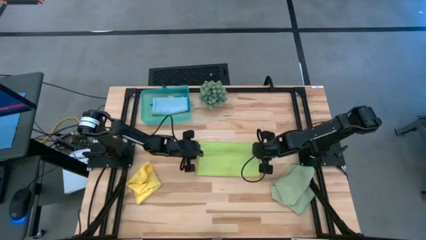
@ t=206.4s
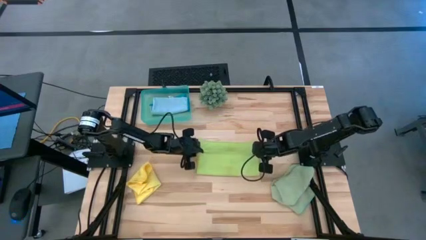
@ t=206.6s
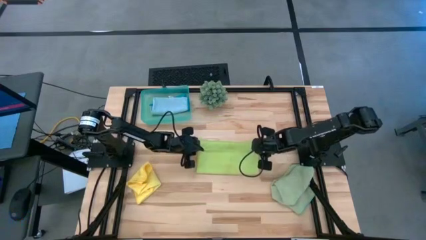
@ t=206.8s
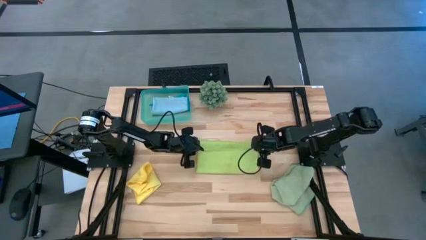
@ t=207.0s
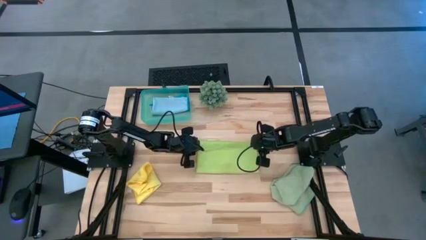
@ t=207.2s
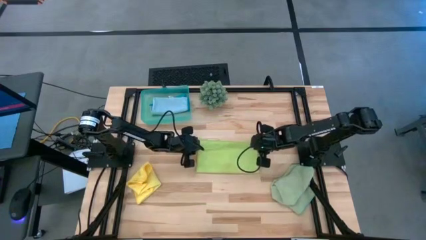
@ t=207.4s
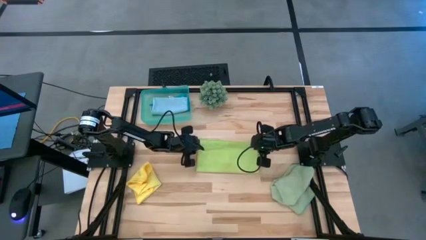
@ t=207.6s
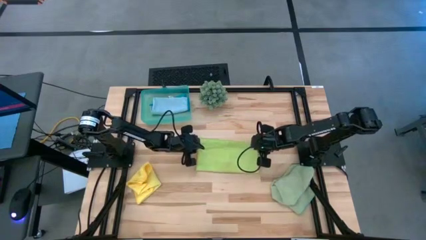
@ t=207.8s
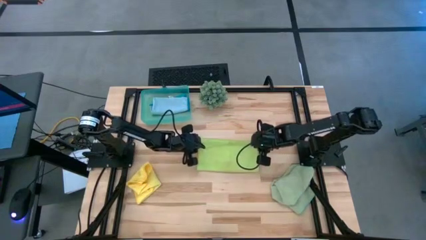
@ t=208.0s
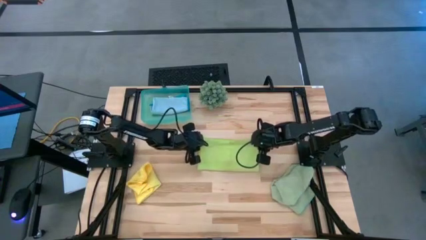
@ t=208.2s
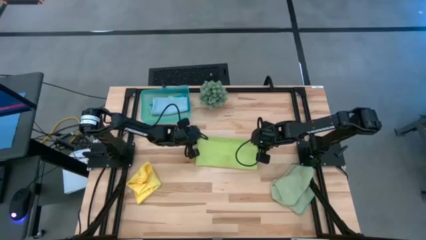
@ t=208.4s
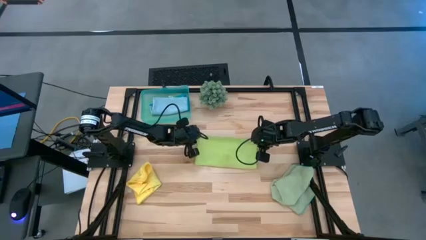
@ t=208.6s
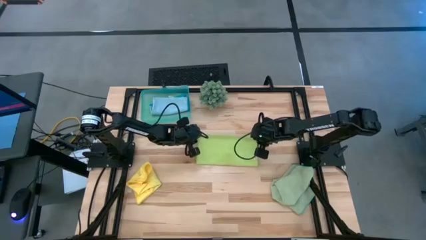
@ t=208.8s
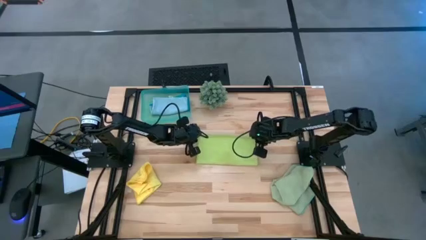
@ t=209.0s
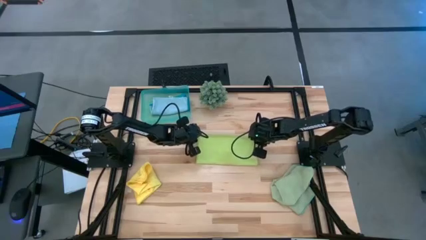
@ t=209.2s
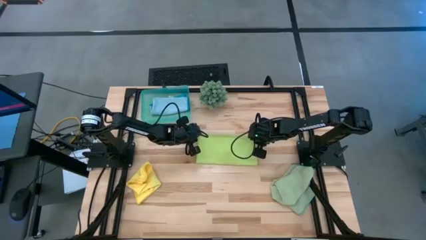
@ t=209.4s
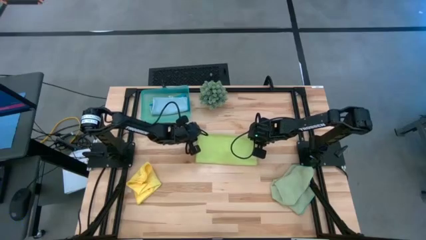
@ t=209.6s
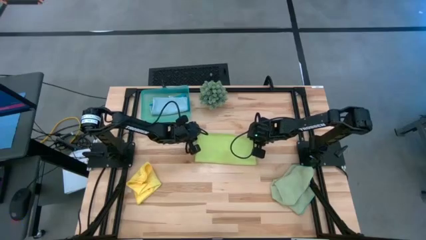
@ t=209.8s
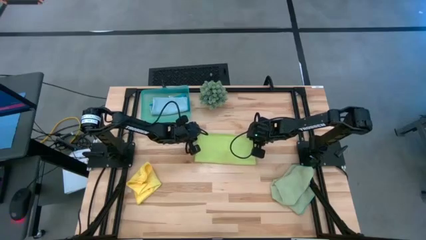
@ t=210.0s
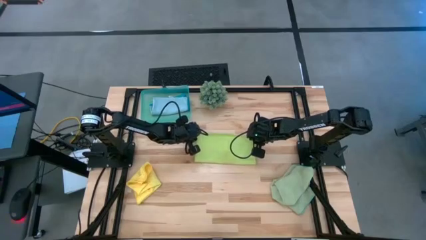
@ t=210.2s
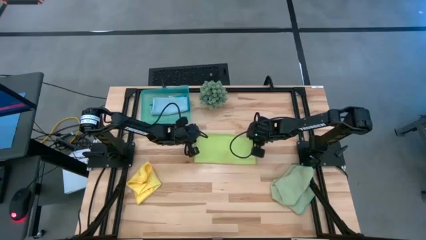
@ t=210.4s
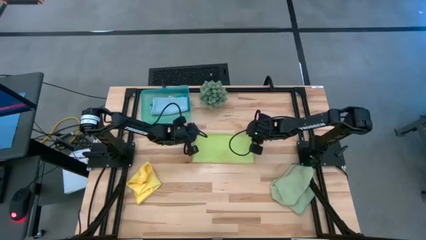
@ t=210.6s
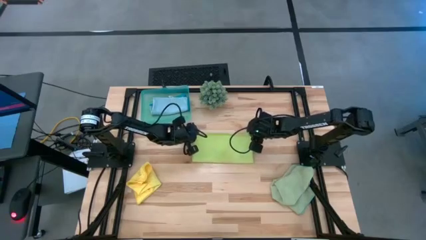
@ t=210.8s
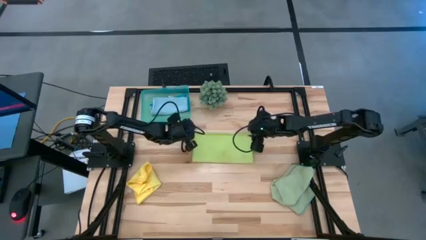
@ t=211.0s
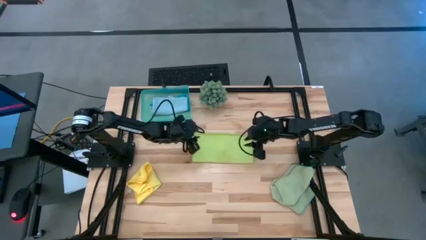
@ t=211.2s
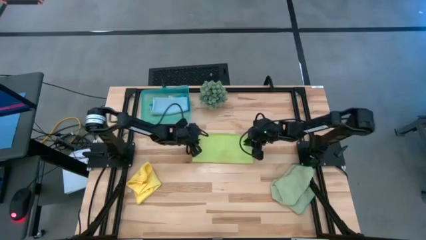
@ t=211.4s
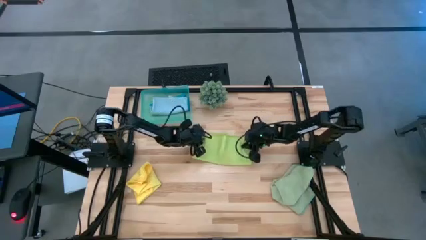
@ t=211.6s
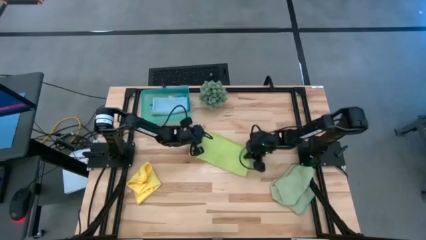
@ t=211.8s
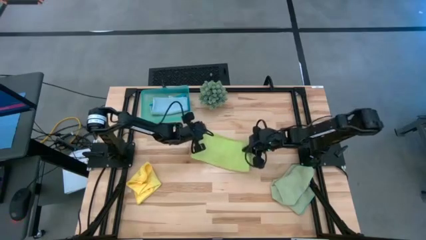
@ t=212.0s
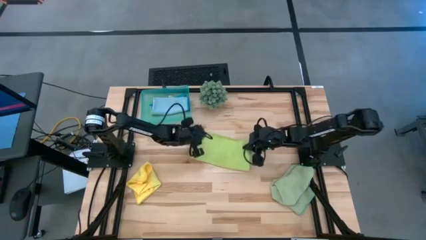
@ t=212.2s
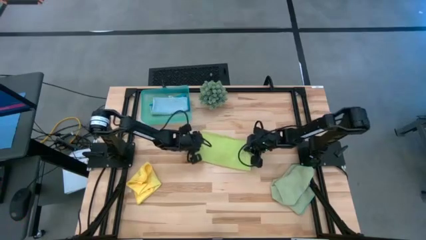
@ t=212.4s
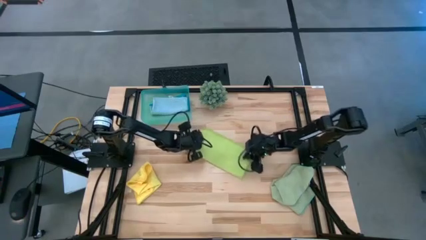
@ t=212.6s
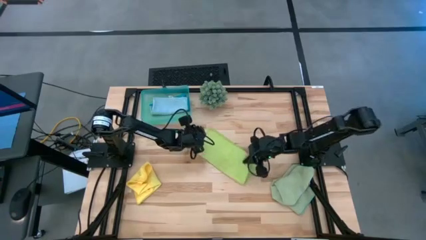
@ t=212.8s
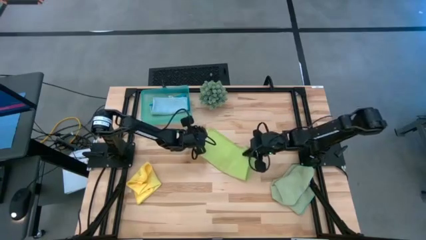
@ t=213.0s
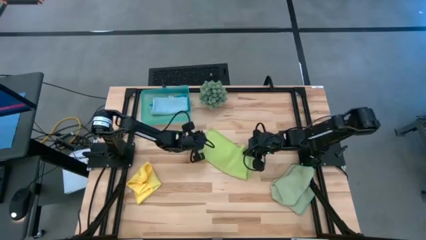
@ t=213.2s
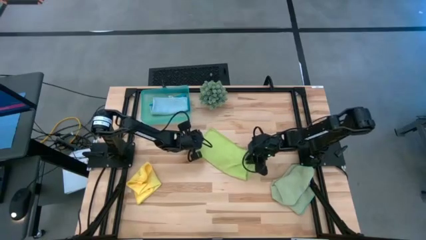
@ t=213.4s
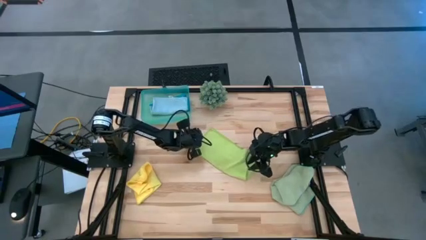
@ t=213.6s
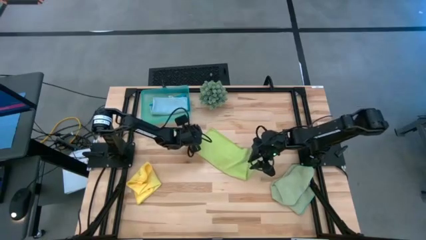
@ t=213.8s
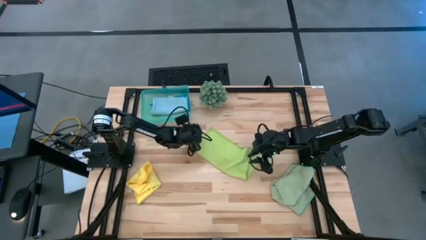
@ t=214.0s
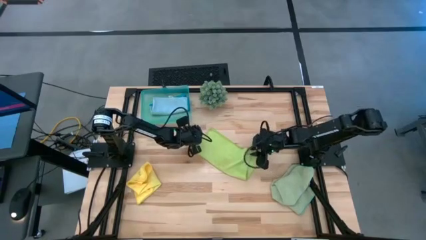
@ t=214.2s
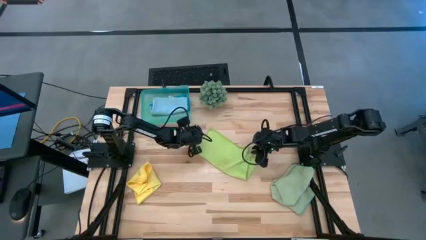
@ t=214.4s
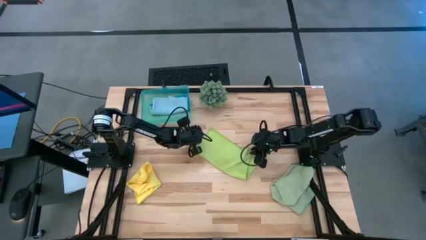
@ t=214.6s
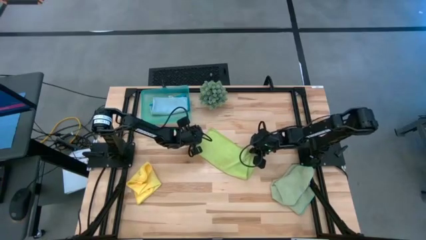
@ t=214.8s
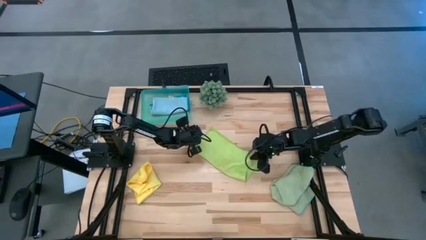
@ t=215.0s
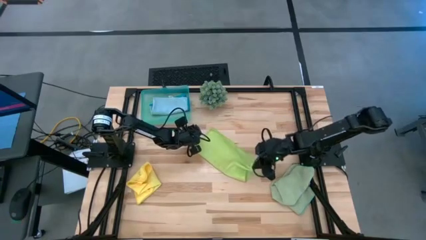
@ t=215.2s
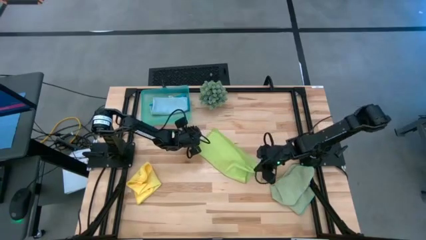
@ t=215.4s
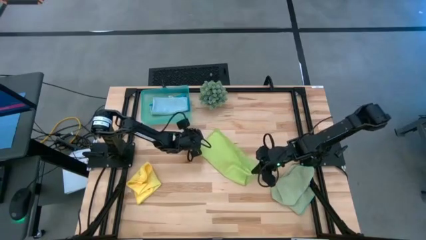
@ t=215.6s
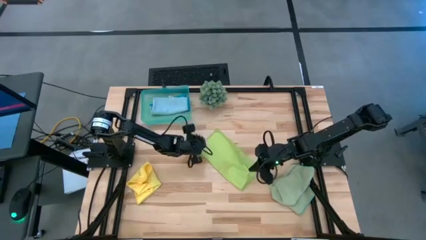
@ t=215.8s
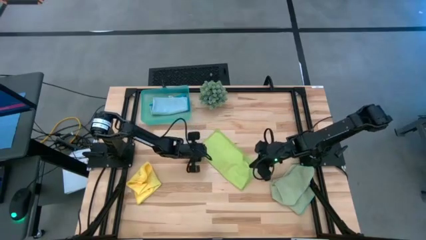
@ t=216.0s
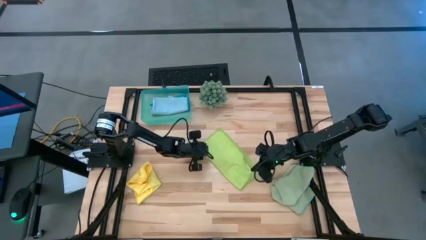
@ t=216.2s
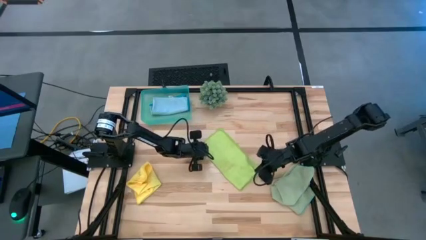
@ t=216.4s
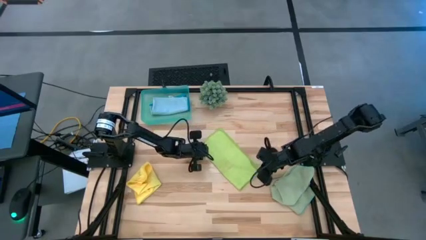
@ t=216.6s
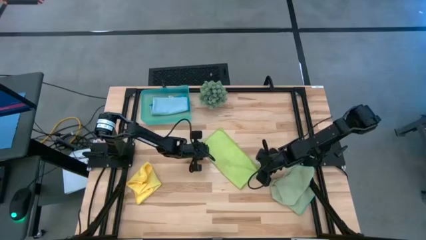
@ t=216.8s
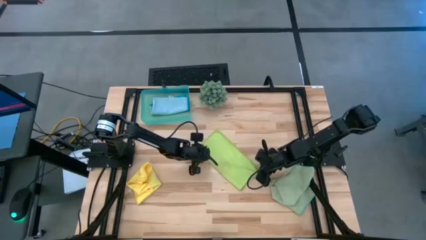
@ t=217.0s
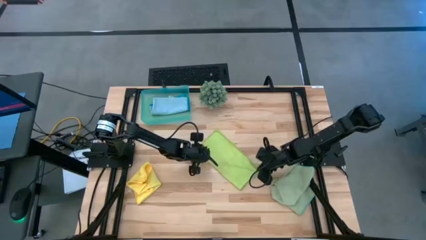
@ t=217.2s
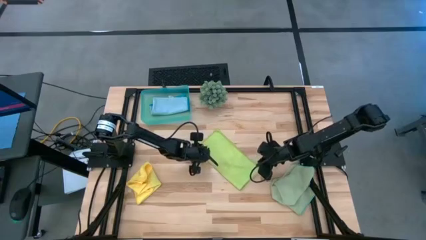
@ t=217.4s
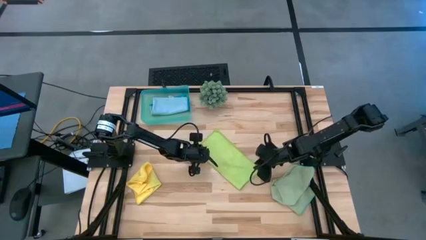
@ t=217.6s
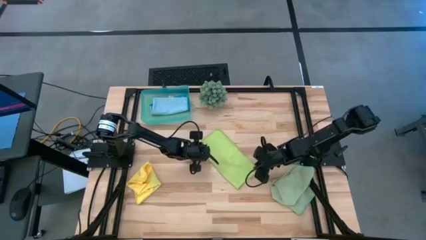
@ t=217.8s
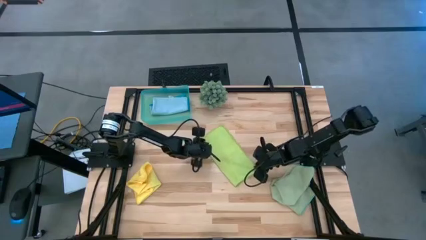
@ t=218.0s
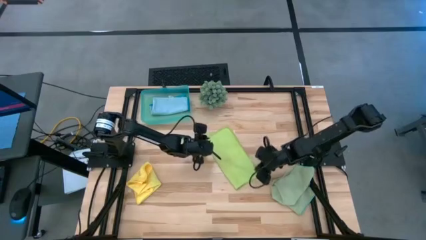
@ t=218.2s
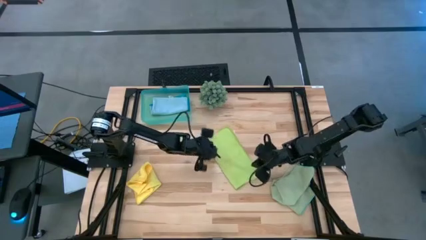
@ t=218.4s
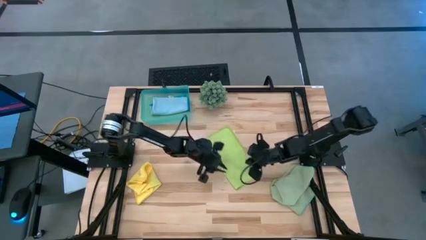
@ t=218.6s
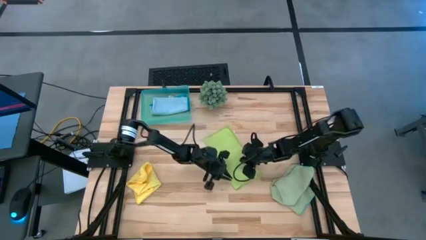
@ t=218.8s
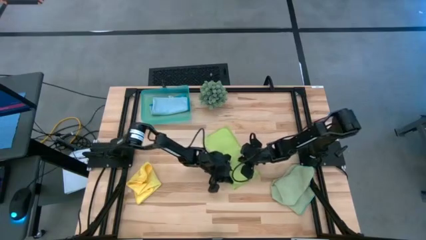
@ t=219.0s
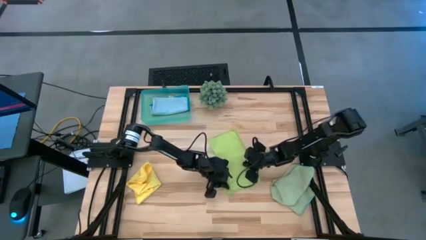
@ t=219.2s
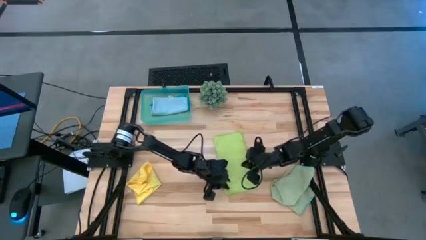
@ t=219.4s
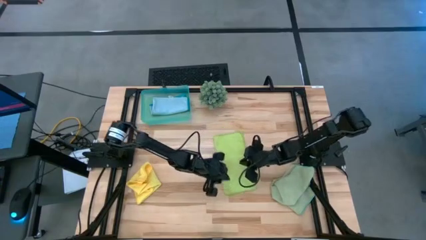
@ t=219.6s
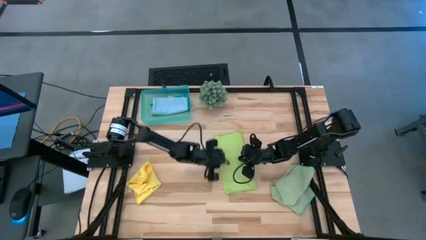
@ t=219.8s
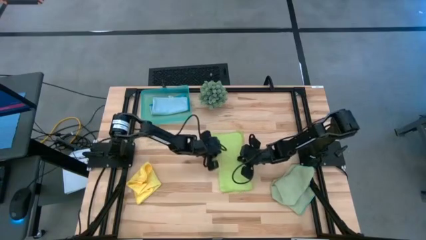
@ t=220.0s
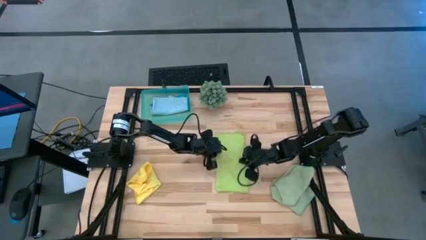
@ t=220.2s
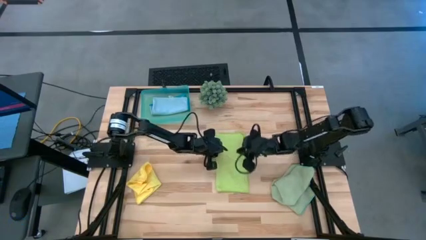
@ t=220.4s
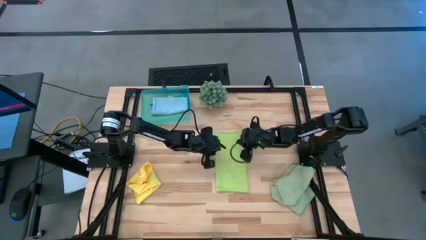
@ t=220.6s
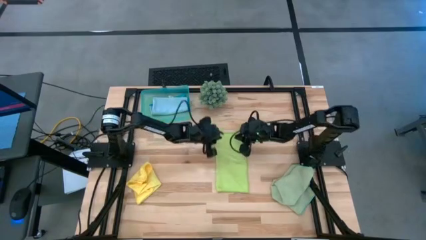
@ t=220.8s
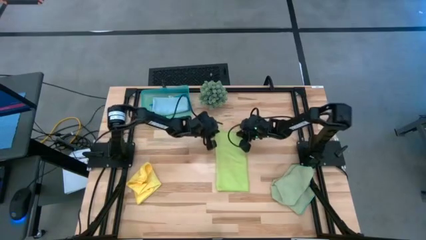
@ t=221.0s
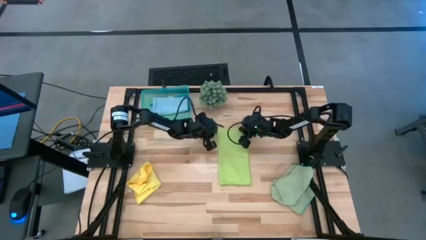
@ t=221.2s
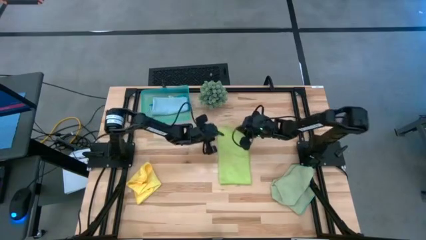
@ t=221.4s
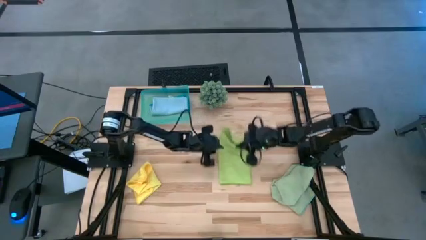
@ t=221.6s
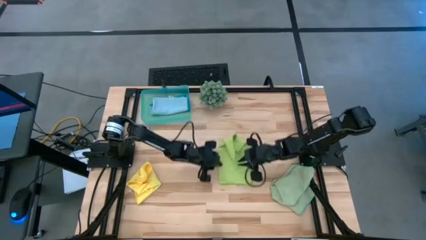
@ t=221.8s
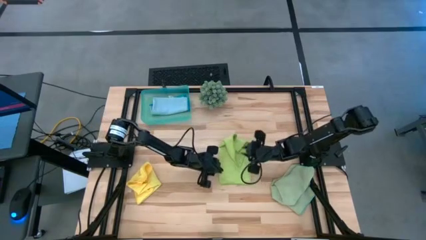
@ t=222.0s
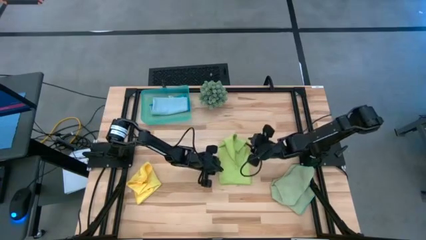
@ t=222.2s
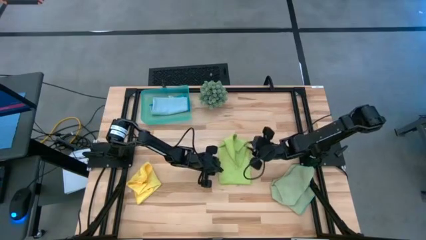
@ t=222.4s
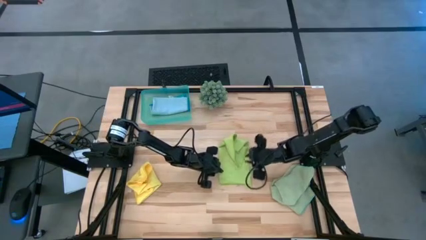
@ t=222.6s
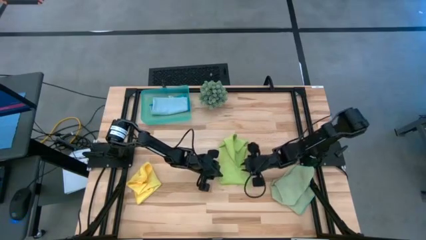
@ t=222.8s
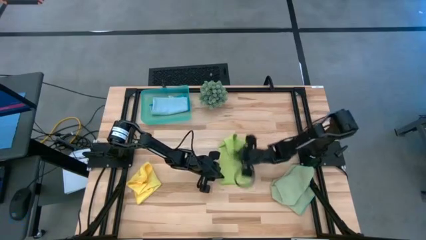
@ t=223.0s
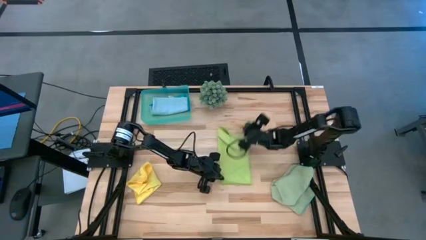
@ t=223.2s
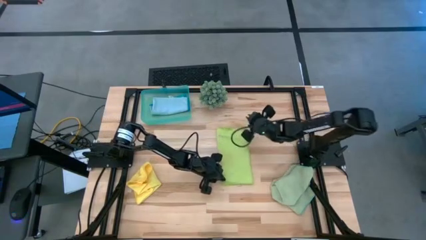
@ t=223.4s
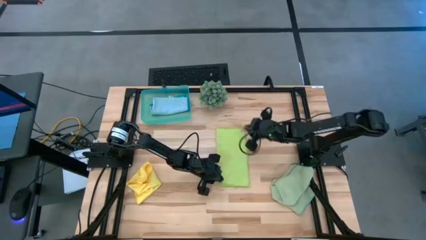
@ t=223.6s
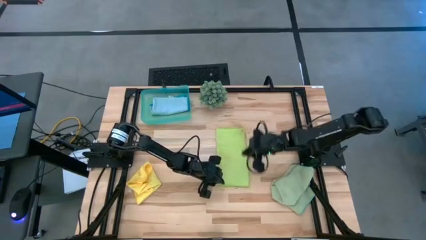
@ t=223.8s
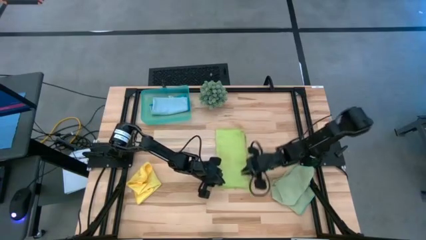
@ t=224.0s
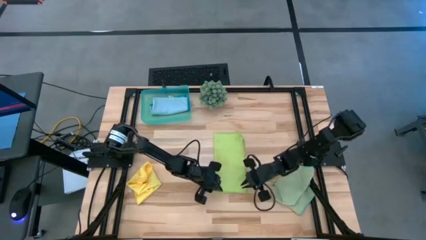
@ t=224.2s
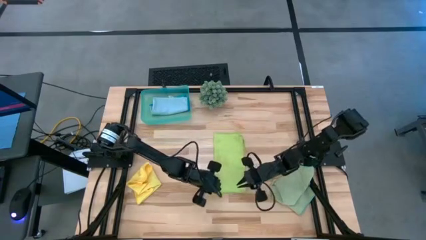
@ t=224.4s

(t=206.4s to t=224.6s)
Task: Fold microfiber towels
Fold the light green microfiber cloth
